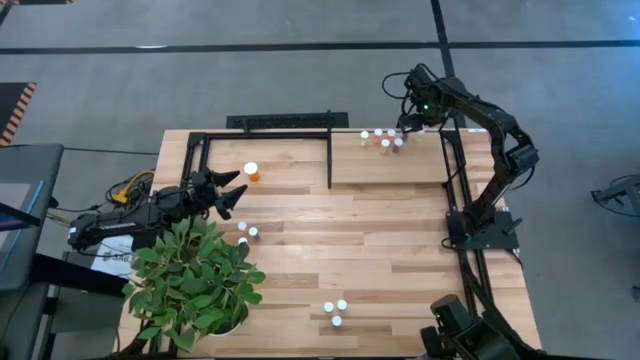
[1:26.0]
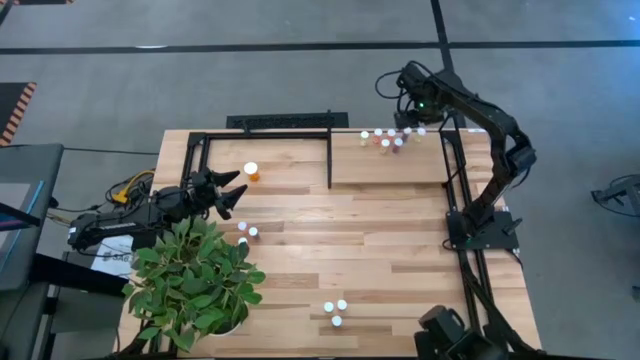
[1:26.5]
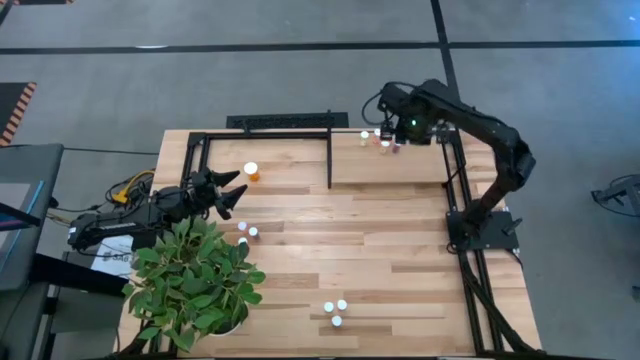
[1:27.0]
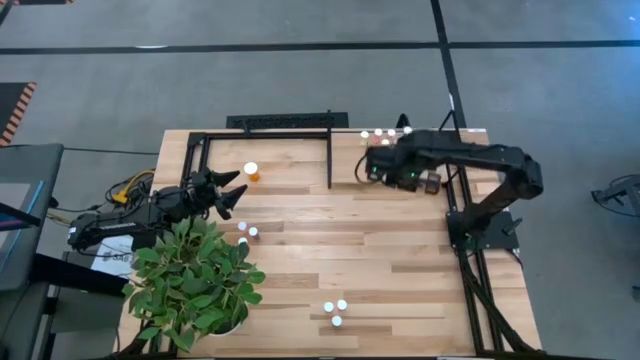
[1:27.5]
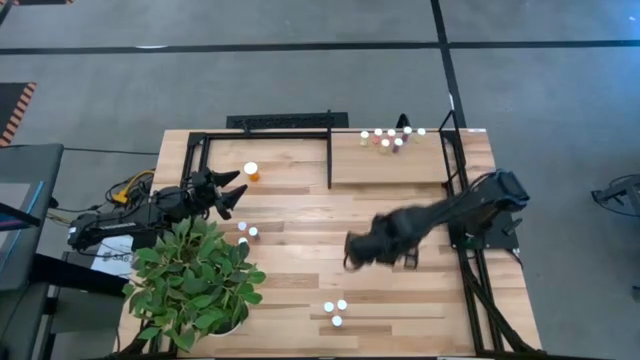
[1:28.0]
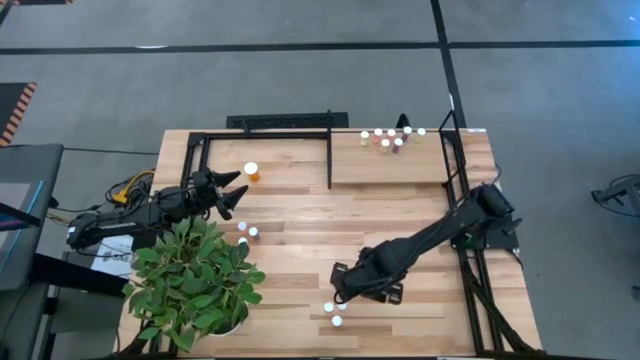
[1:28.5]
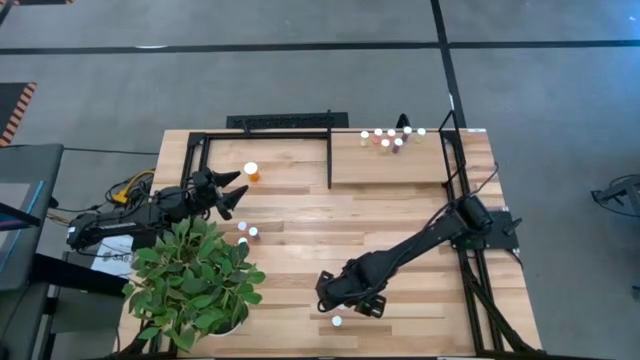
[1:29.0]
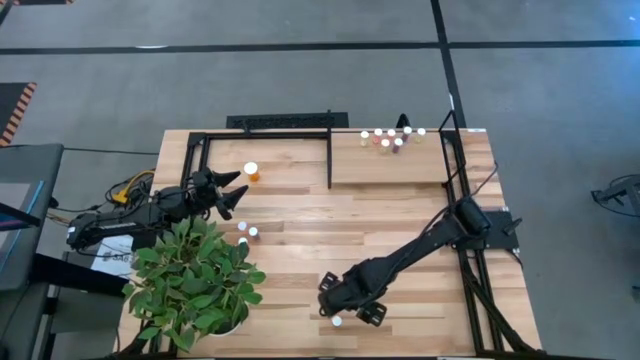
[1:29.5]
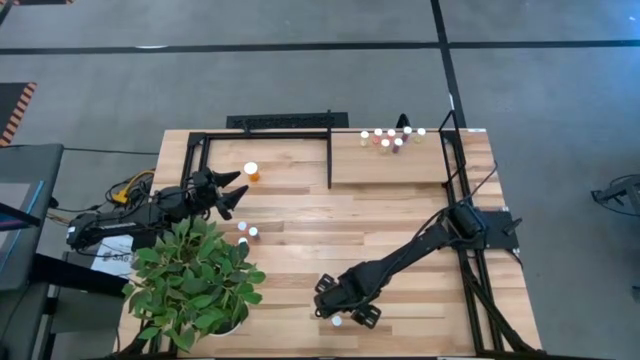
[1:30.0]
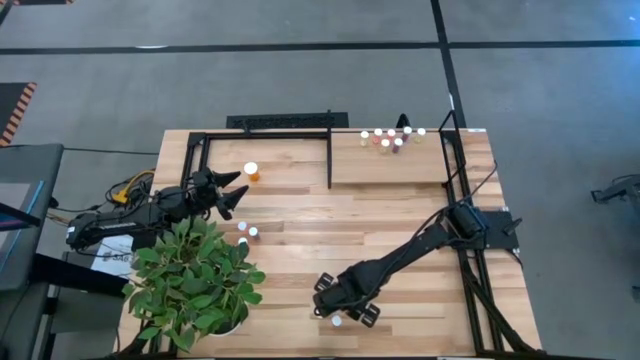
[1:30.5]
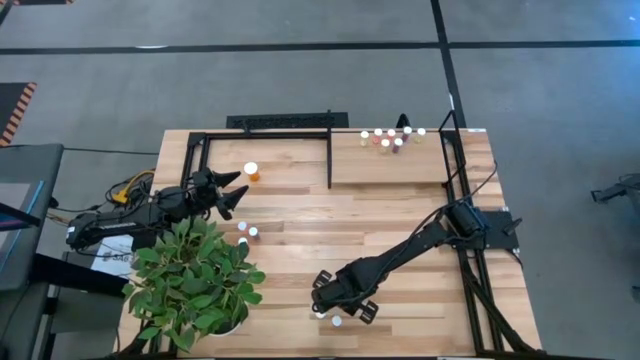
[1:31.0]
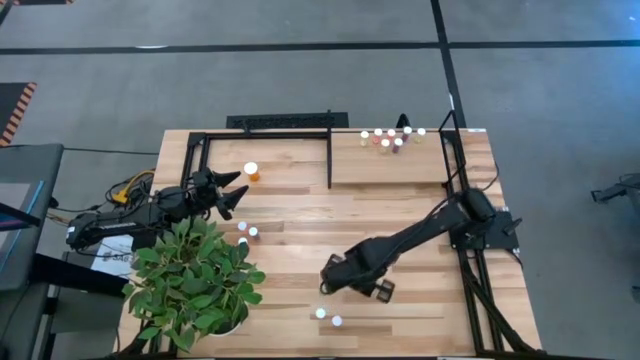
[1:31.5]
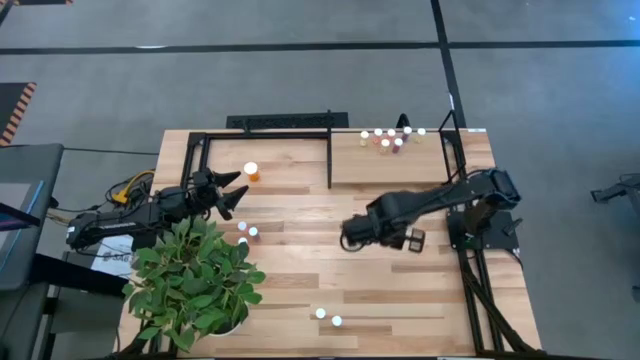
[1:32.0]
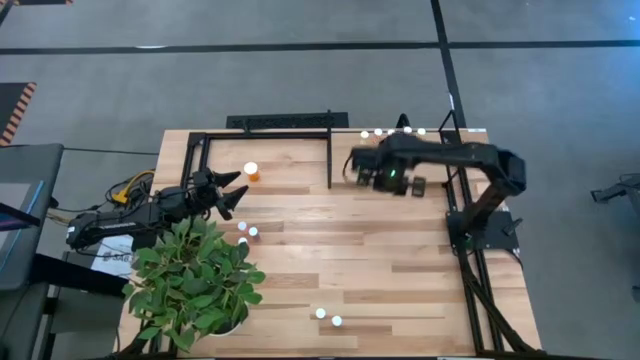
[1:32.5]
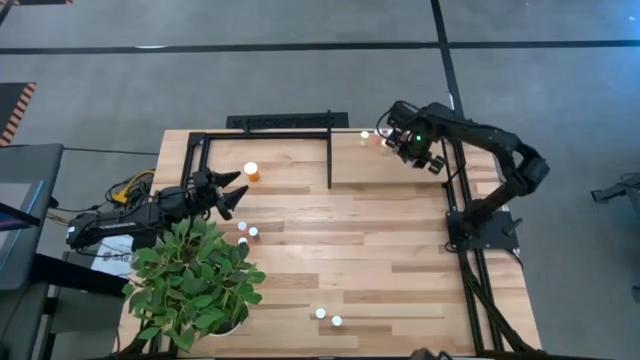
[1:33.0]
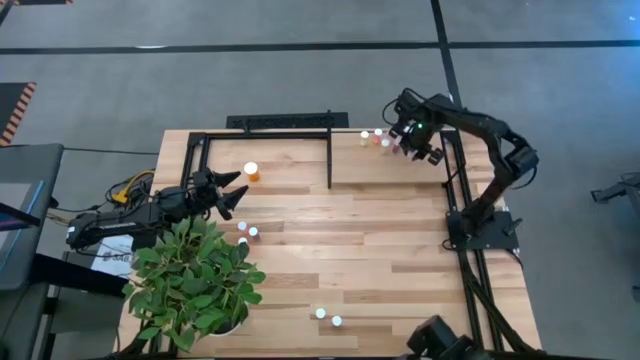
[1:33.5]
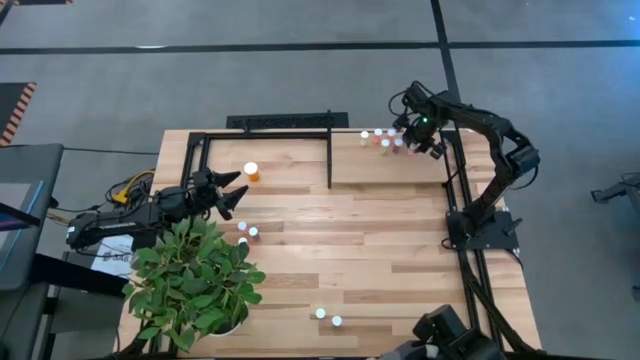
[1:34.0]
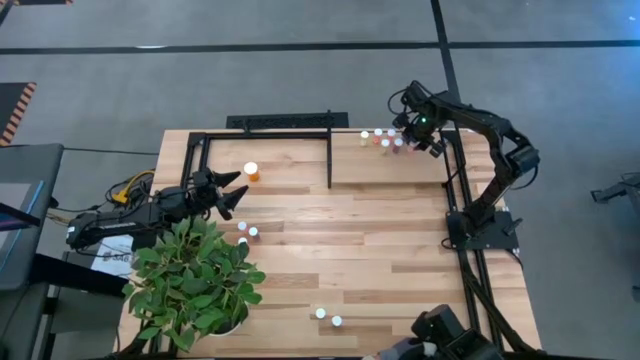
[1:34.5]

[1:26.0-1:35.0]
Task: Pick and place medicine bottles onto shelf by color
Put the pink pill bottle on the shelf

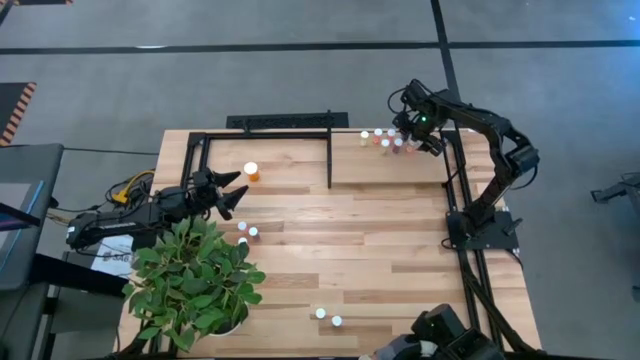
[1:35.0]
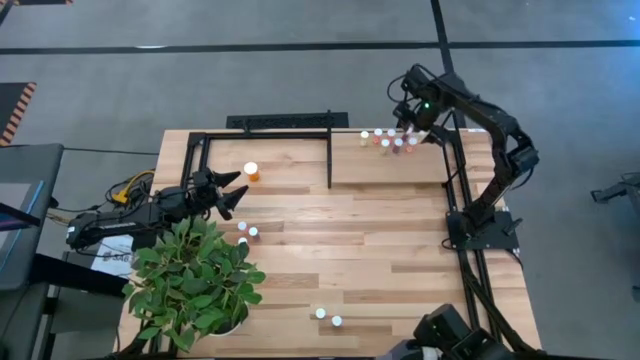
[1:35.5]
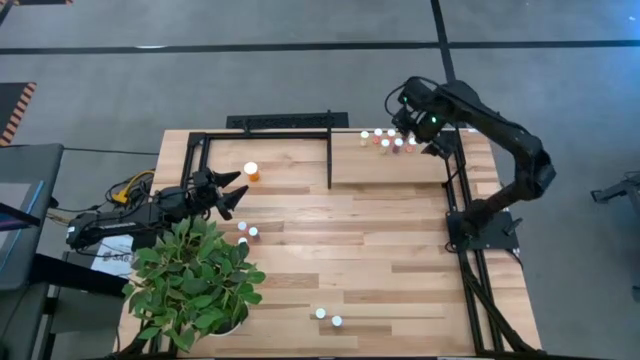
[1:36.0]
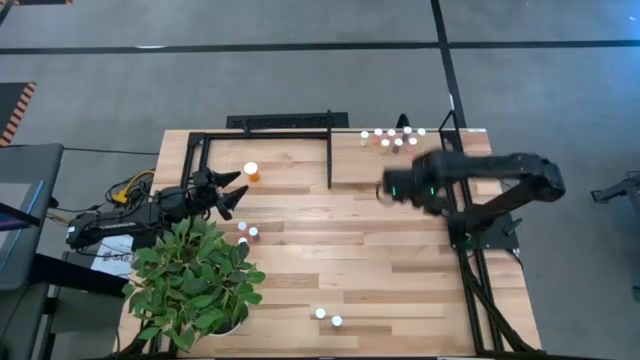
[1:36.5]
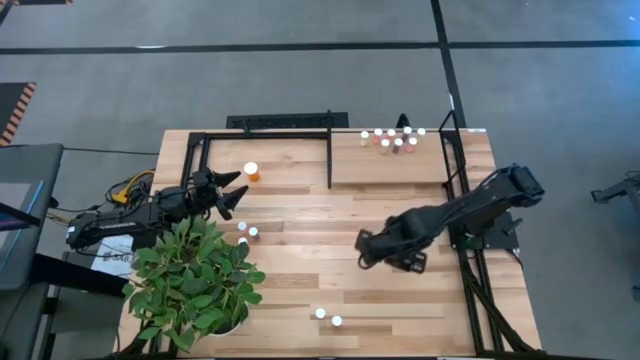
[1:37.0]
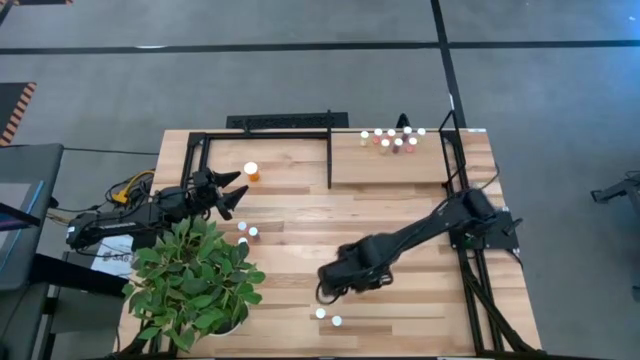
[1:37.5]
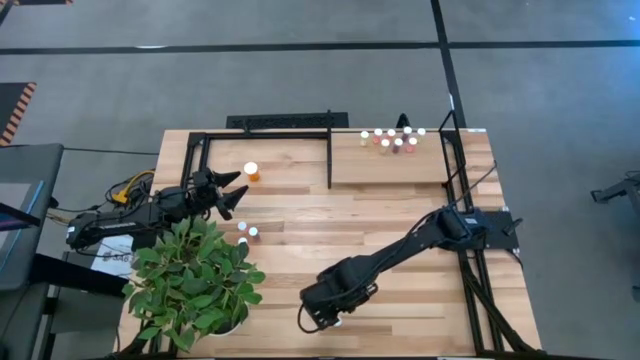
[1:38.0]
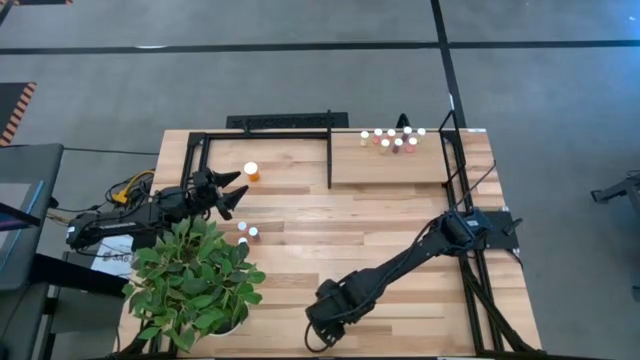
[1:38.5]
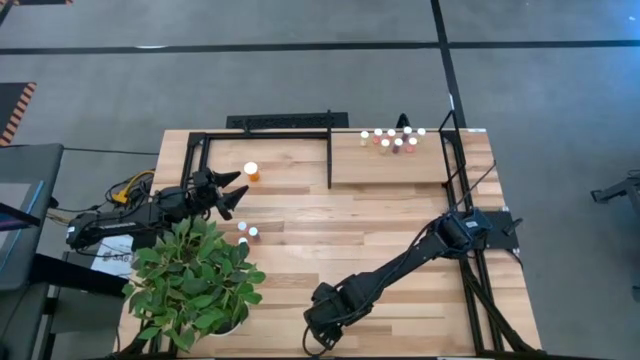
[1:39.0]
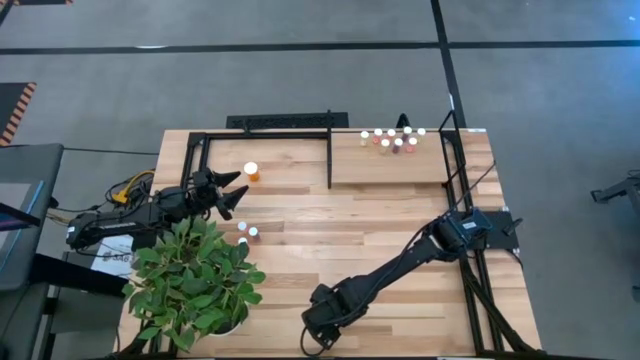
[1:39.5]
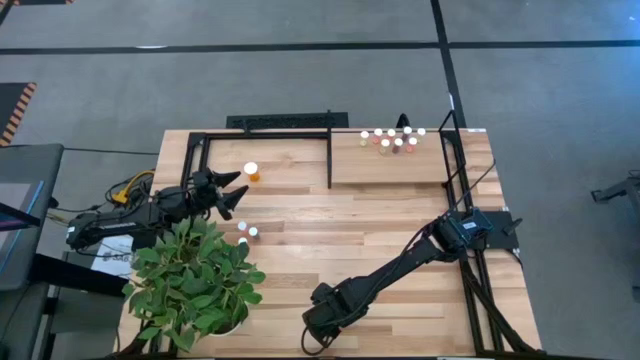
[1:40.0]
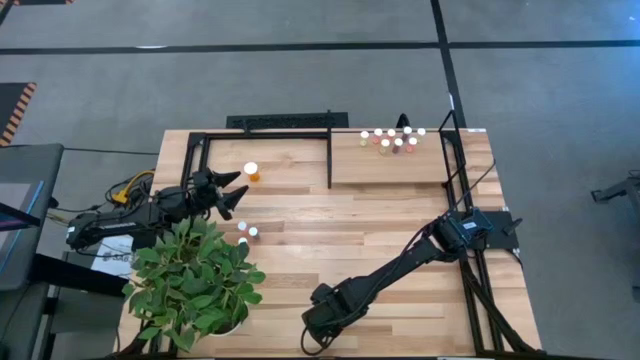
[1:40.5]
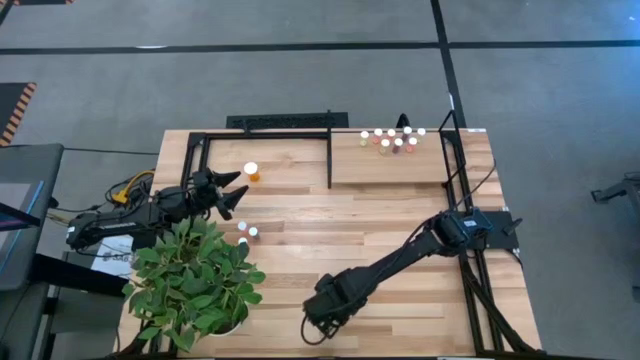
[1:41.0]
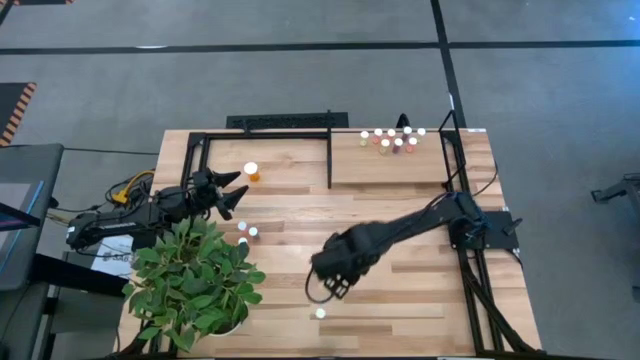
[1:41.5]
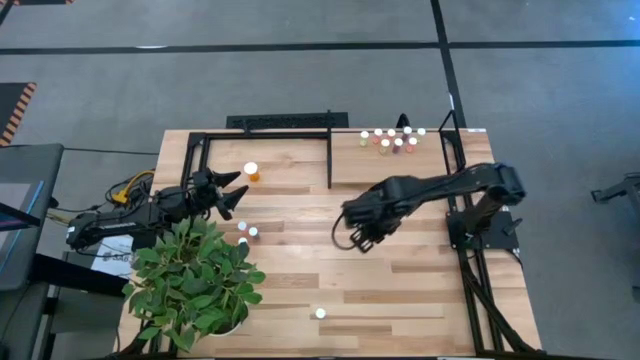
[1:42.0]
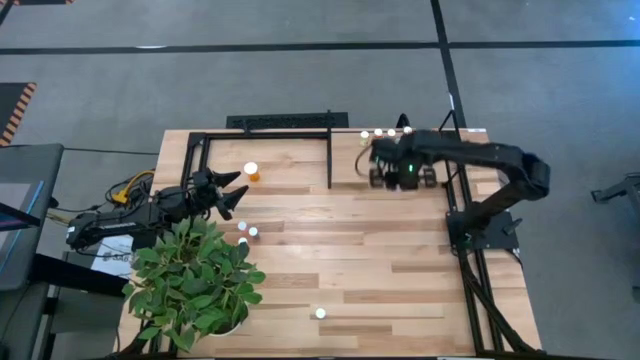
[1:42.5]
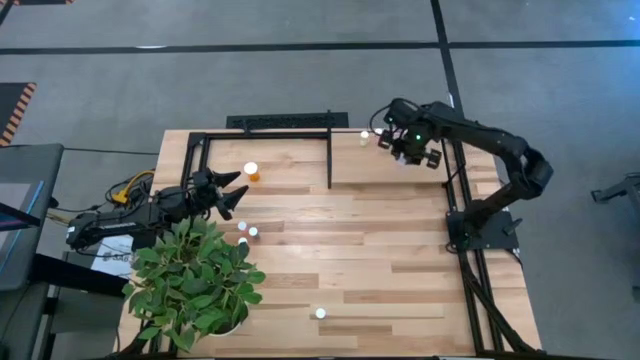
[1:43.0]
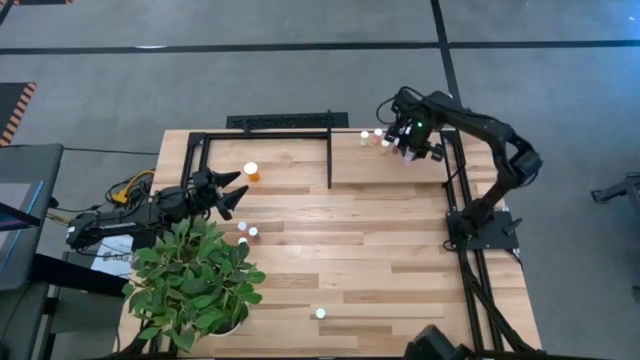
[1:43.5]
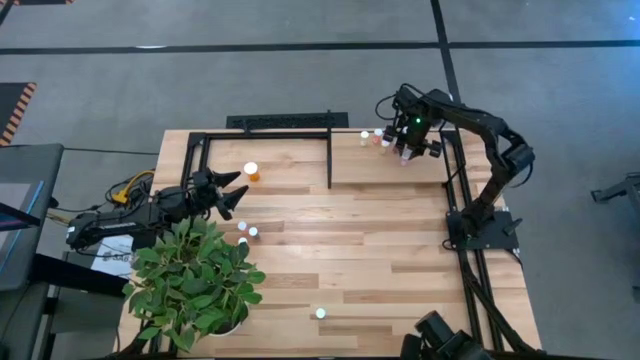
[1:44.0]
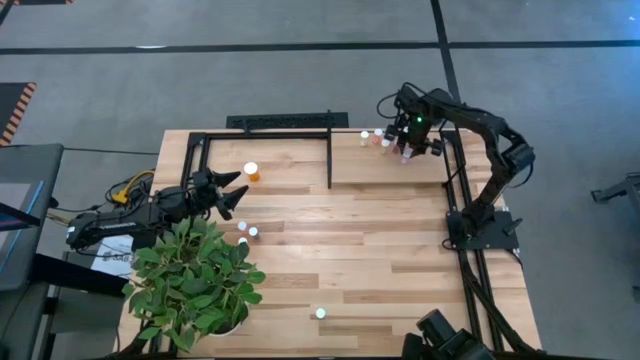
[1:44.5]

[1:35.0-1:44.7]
Put the purple pill bottle on the shelf

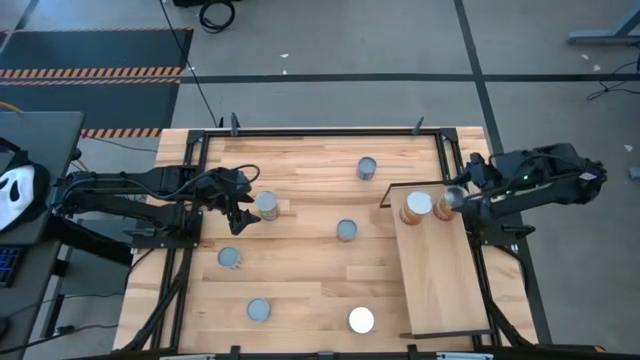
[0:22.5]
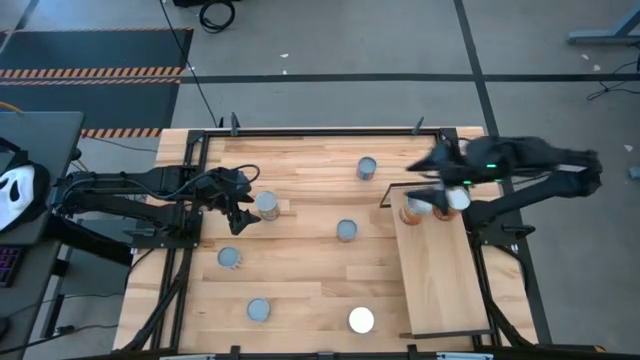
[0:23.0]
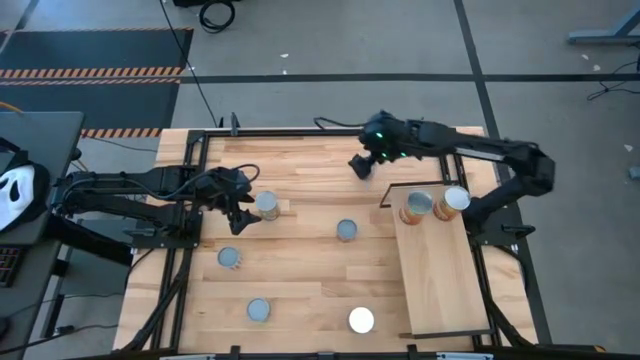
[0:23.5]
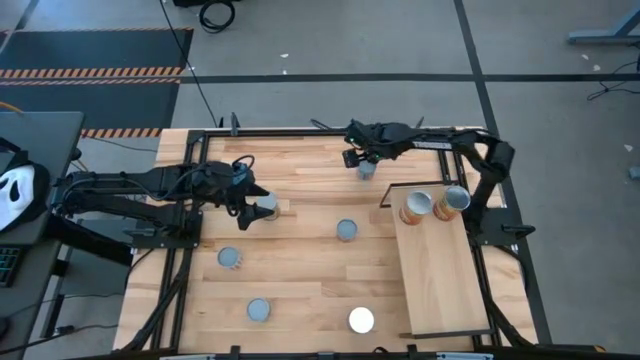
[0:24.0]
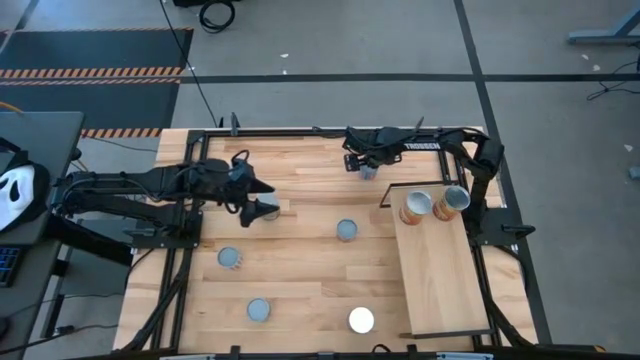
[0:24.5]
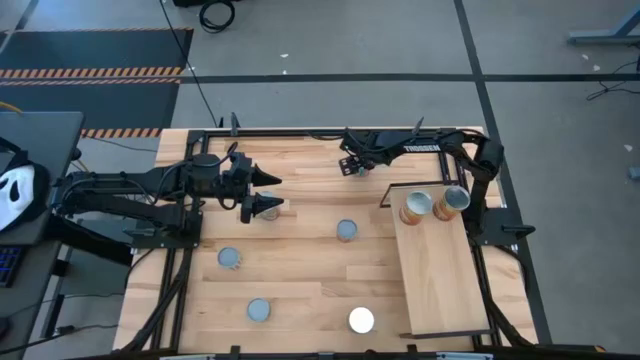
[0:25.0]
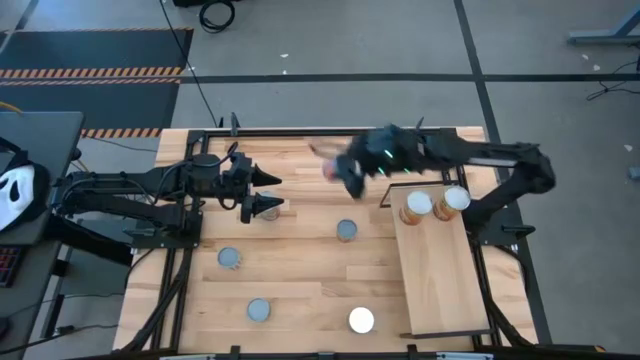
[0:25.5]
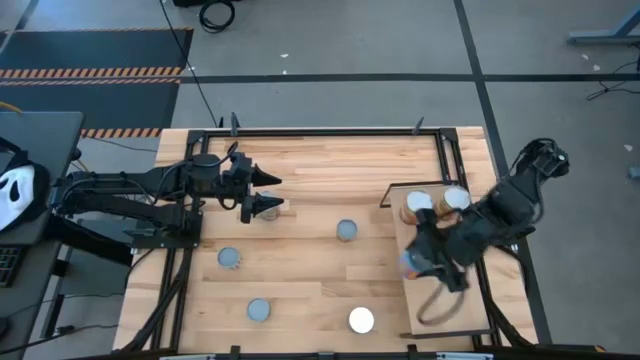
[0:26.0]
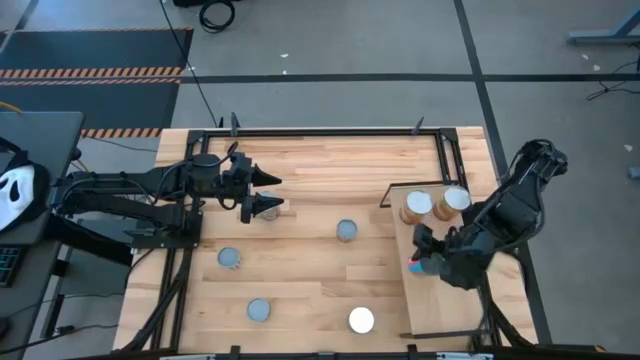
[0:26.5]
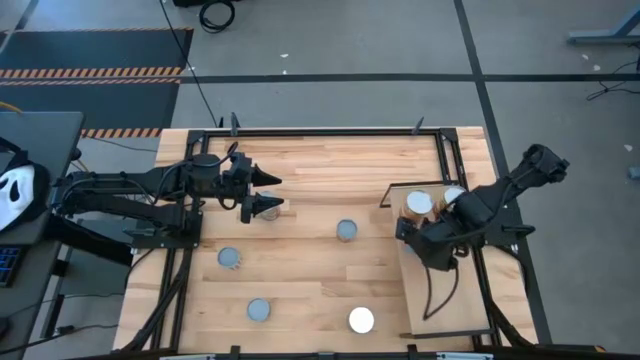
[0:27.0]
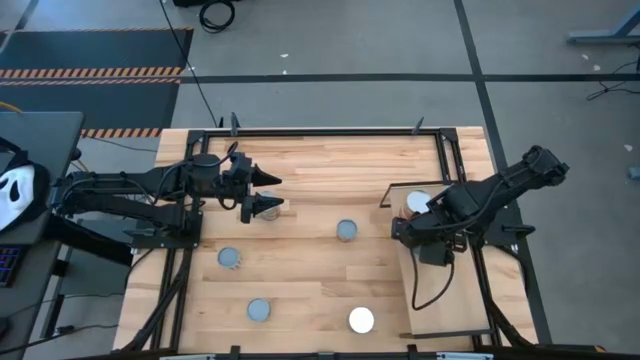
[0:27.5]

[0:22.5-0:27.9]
Task: Pick and place cans onto a shelf
Put the small canned corn on the shelf
